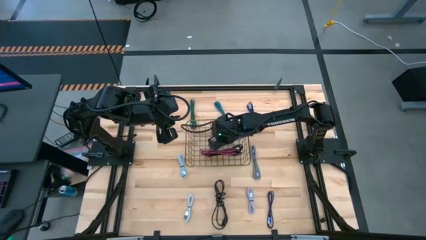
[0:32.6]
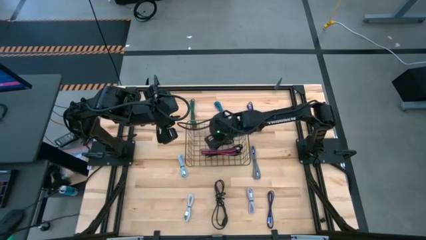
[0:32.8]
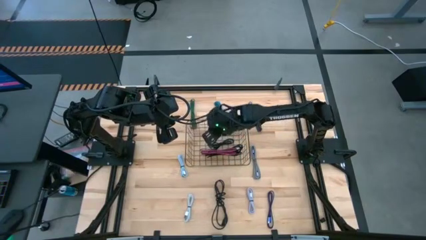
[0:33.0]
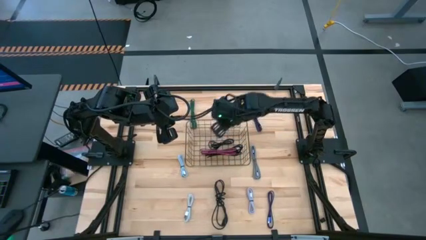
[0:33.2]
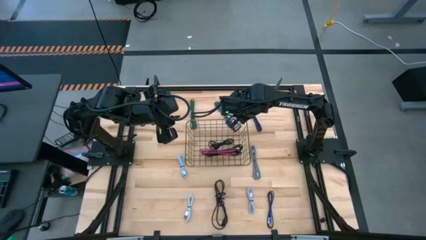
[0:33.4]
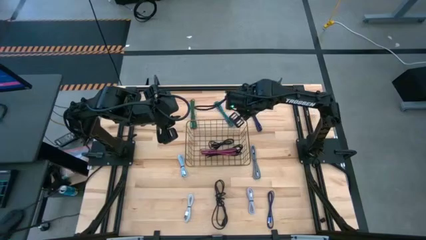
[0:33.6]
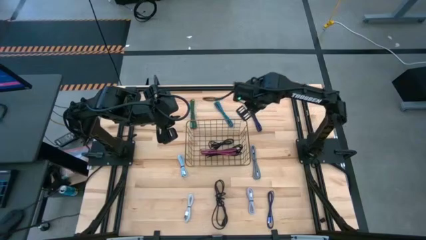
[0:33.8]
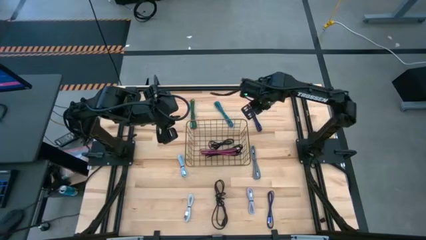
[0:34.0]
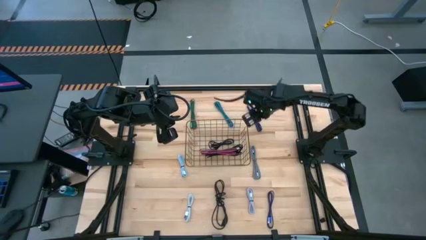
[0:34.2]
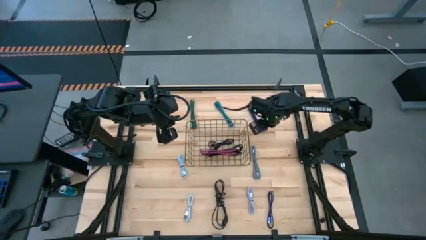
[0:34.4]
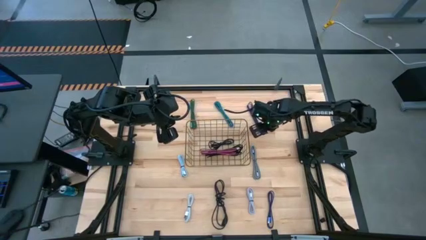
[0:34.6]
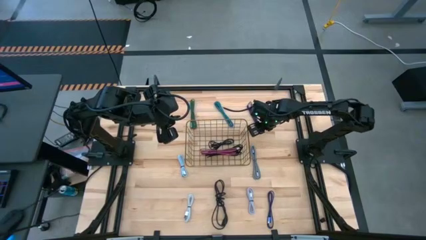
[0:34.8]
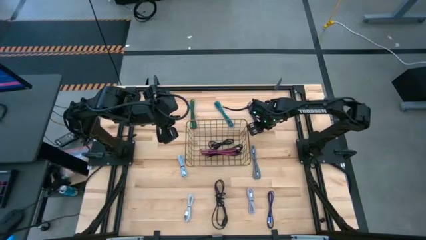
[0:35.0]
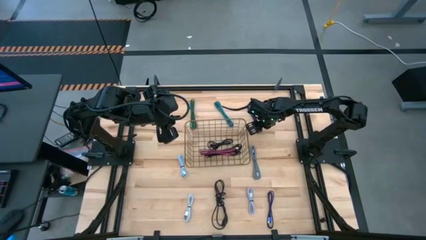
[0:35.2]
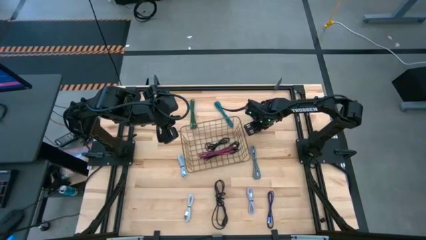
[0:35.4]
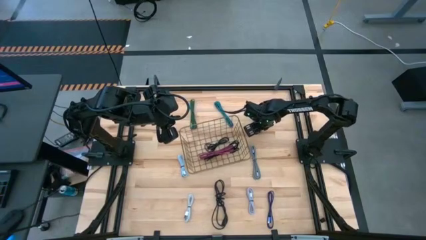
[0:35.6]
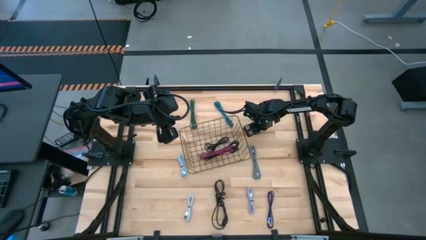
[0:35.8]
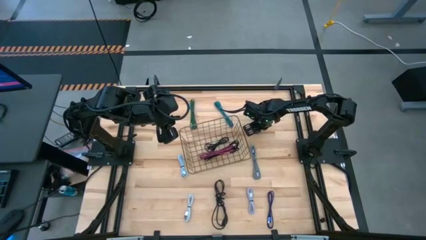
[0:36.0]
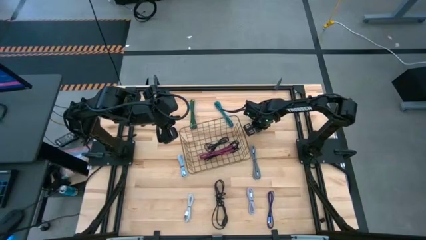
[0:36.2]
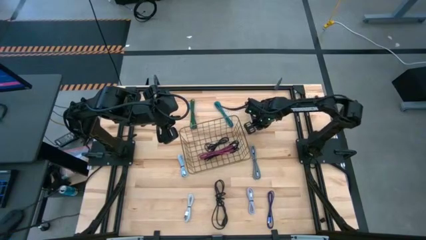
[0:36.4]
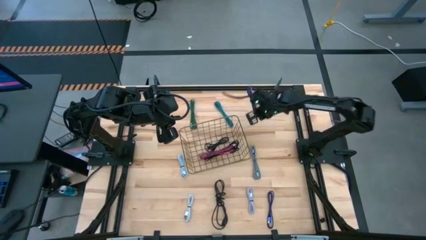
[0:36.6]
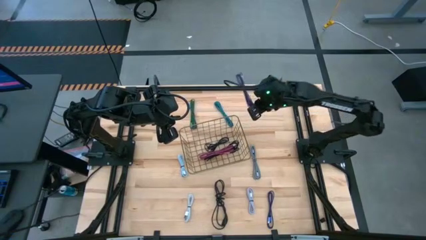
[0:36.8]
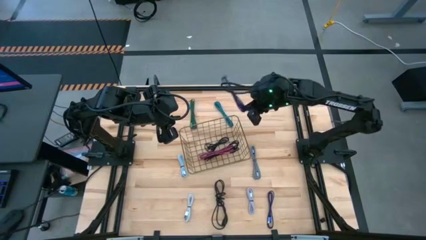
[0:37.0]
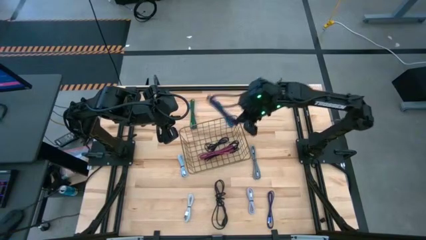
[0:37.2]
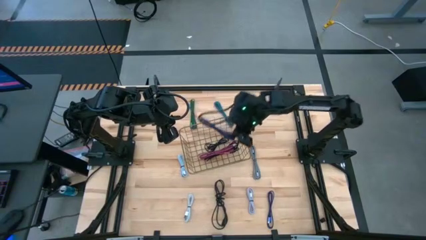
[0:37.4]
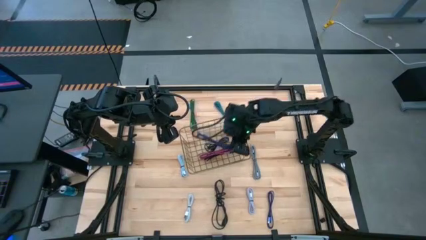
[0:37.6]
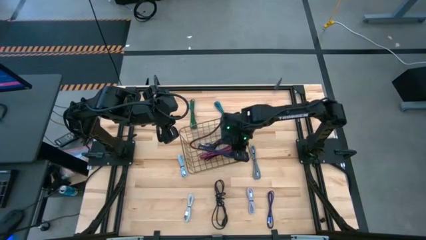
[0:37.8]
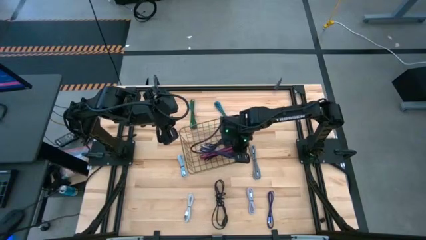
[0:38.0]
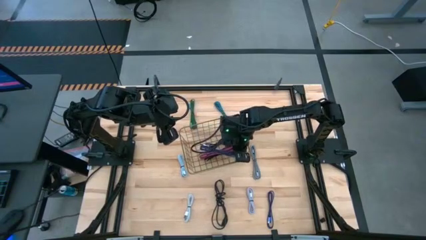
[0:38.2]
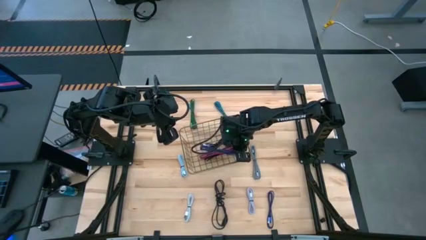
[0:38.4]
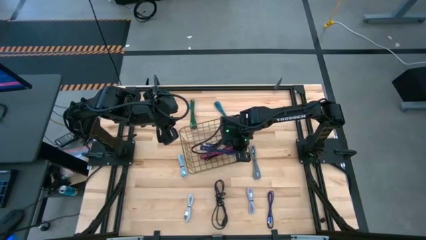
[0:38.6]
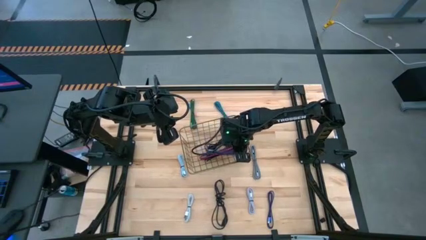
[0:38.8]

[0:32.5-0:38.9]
Task: Pick and place USB-C Cables
Put the top dark blue USB cable into the gold wire basket

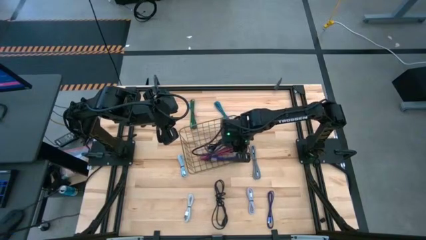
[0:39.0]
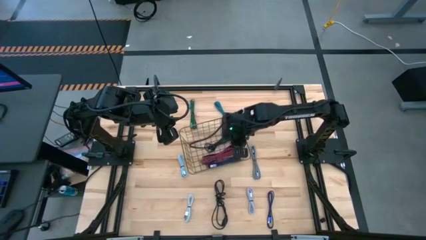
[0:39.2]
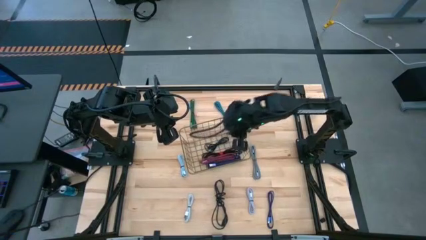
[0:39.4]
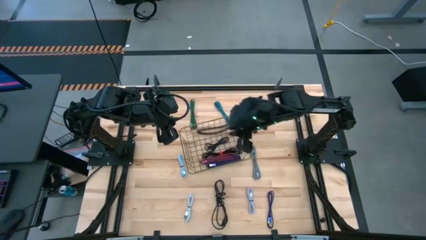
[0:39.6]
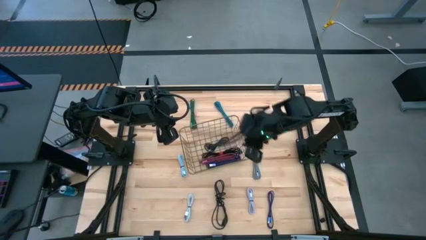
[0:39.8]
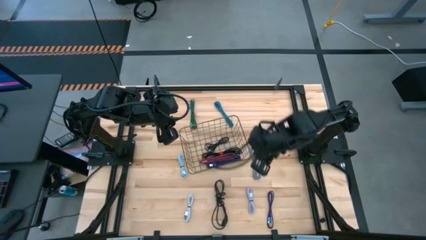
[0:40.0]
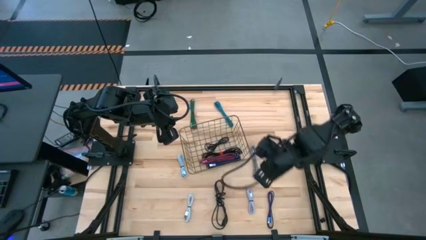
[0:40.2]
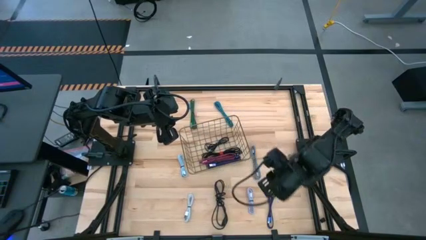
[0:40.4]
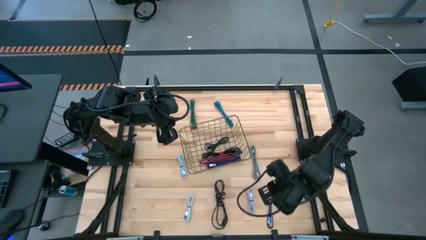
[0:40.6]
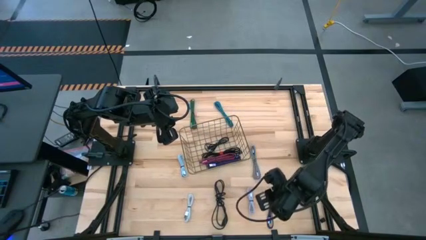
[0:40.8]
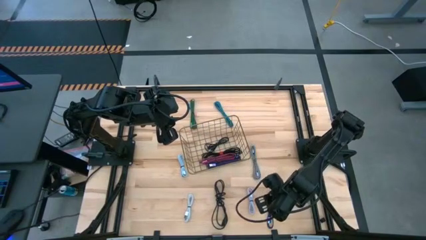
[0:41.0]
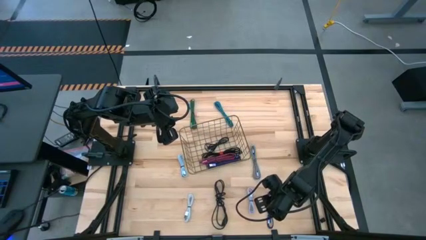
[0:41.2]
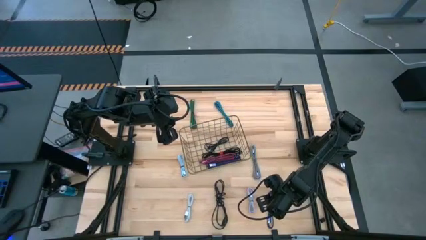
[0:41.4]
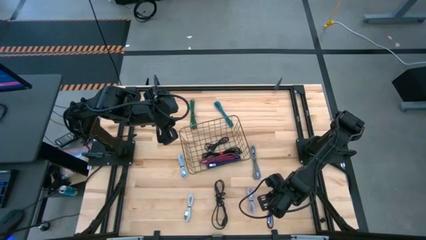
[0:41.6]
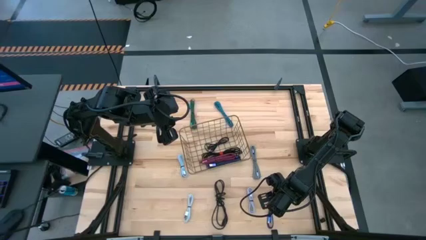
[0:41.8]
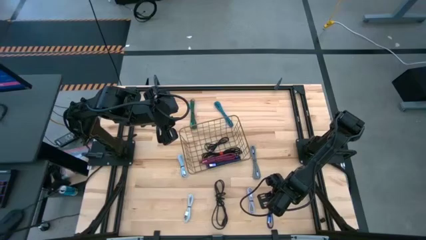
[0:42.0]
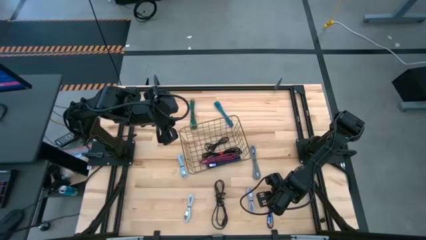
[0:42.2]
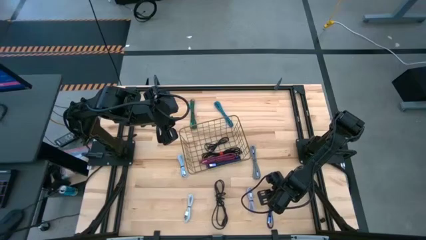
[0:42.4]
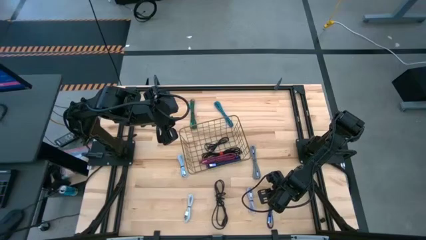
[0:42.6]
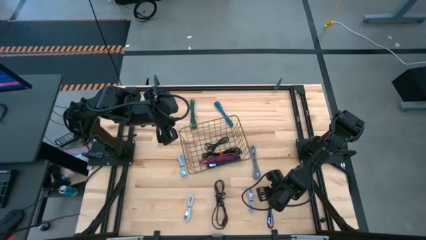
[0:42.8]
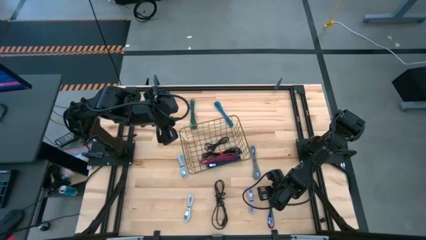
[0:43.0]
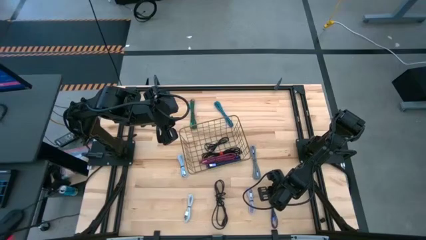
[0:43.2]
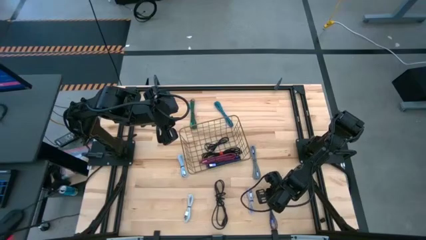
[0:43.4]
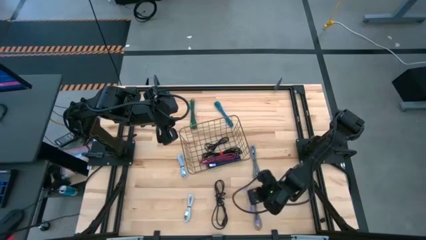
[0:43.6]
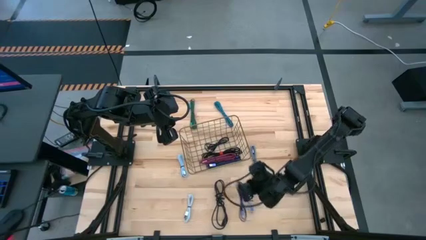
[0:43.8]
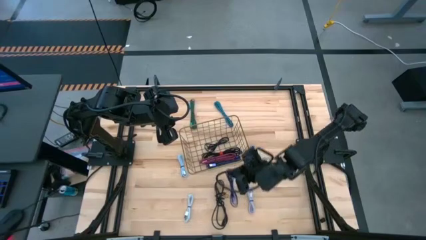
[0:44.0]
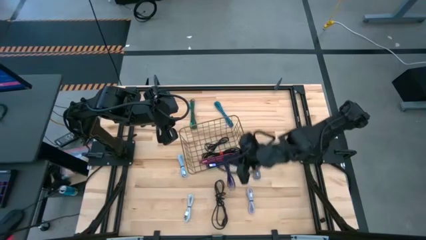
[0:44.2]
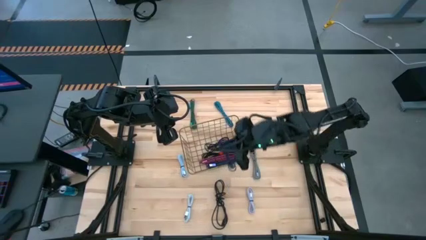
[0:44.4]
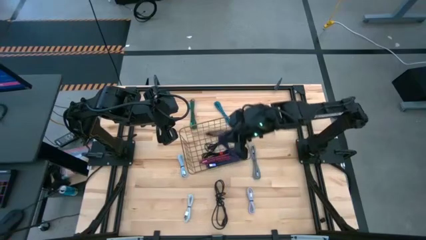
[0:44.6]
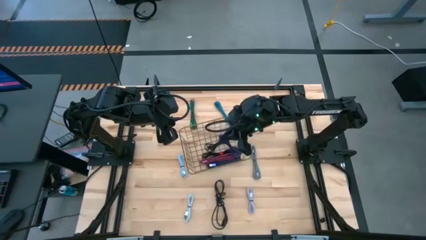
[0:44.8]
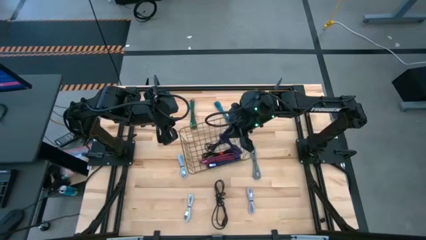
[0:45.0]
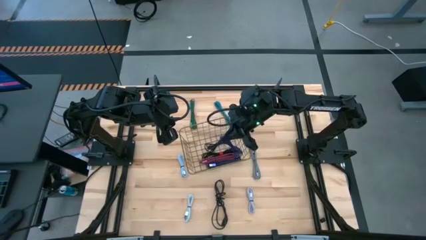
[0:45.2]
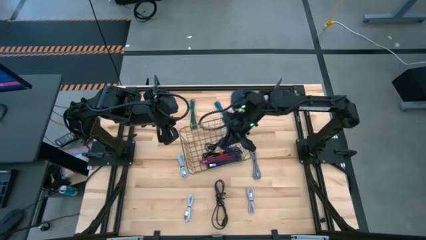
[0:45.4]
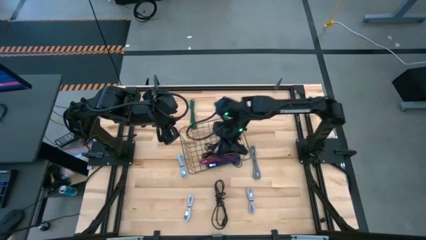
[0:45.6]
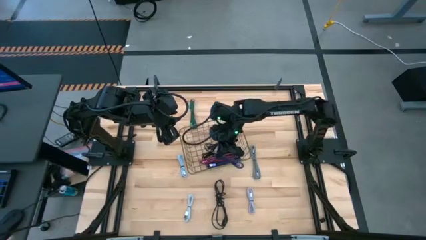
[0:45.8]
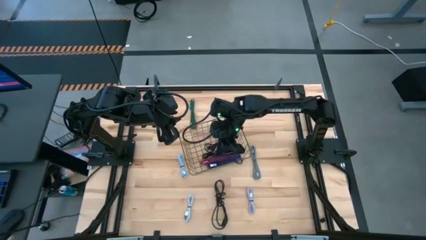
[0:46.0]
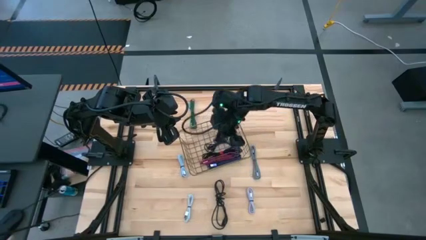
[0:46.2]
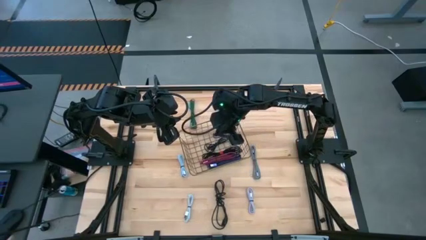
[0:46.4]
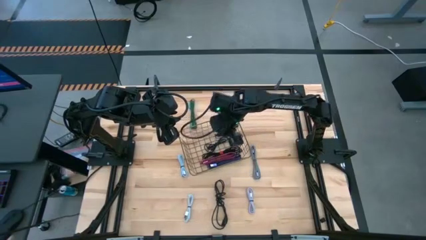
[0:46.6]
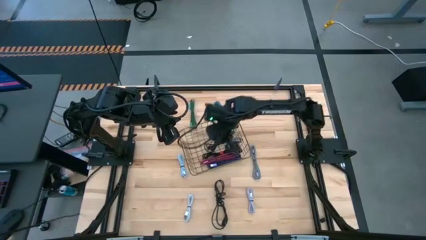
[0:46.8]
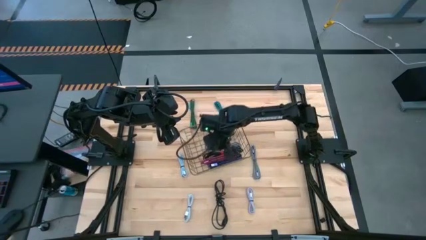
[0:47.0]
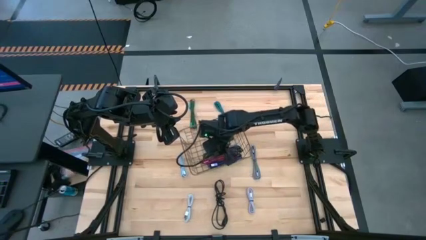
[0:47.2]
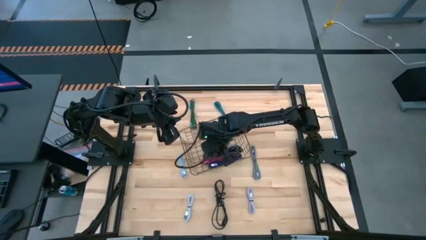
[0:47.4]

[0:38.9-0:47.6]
Put the dark blue USB cable into the gold wire basket

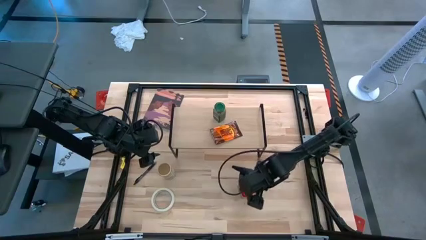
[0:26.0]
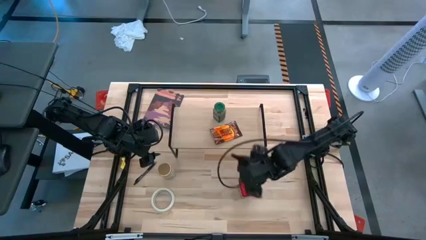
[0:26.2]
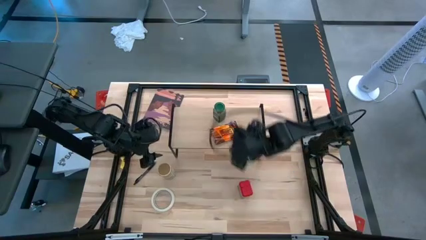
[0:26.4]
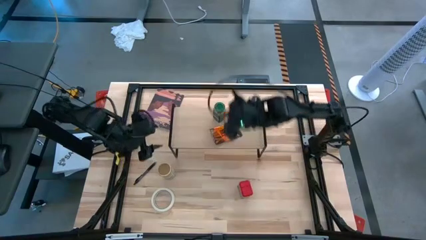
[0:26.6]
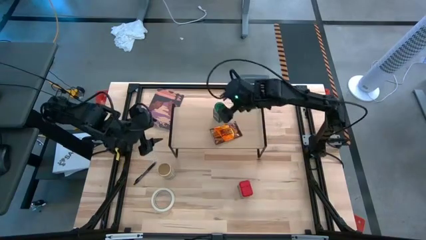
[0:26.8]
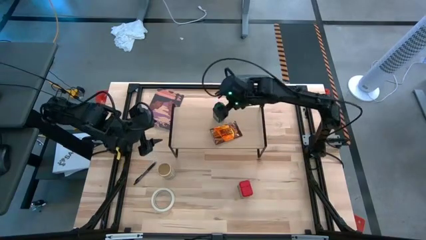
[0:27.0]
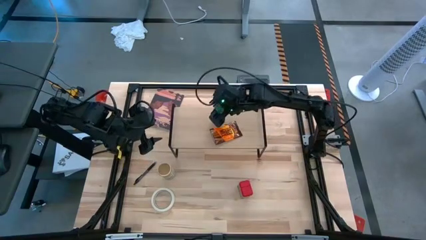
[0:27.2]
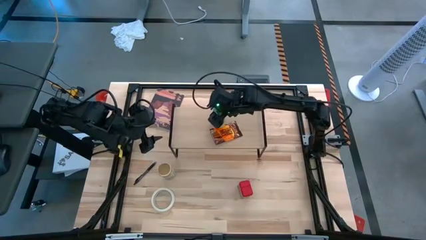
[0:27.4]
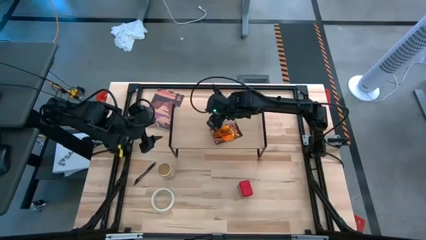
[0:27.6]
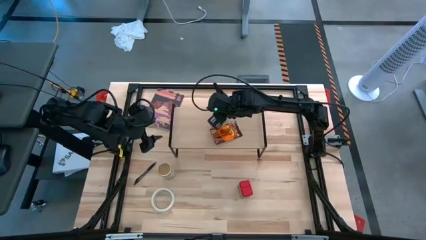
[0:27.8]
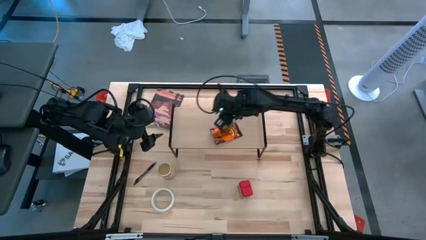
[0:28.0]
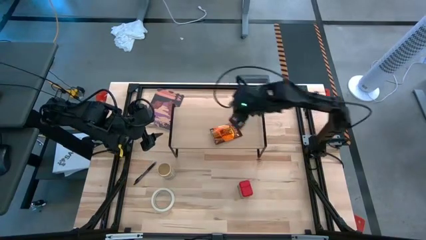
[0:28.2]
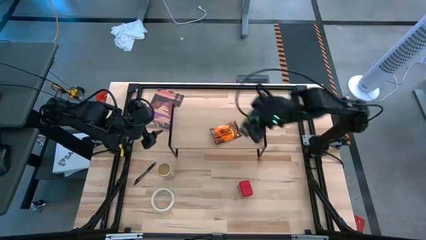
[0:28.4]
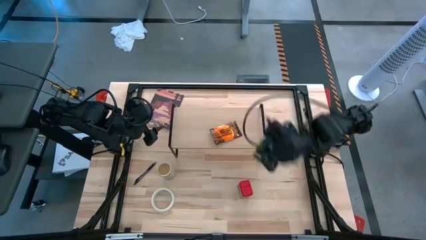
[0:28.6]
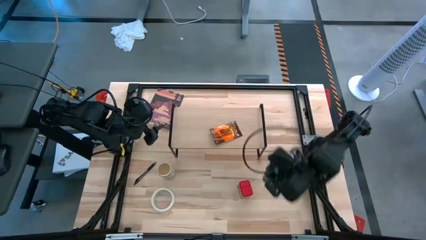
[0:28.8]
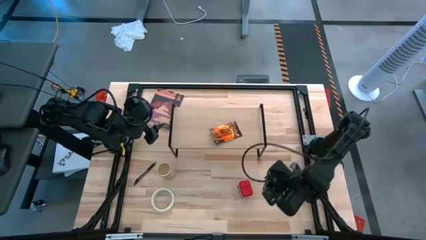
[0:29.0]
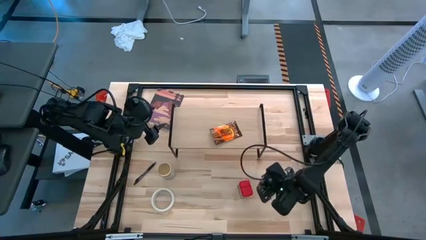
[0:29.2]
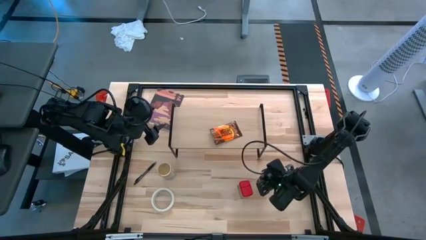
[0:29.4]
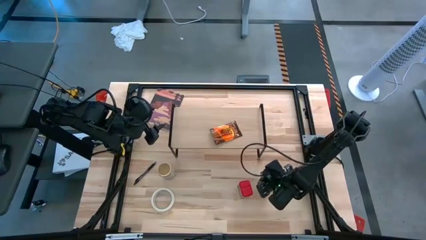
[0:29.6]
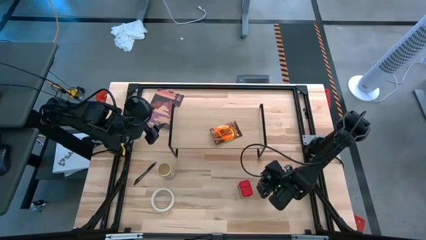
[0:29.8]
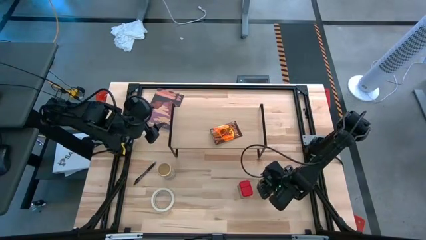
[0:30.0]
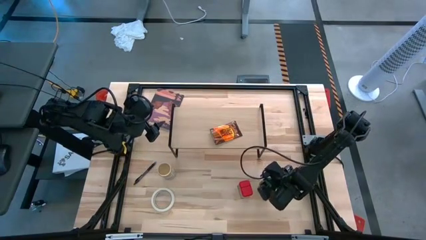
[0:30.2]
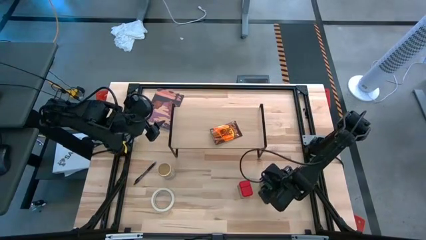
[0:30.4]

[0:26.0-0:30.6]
Task: Shelf spices
Remove the green seasoning bottle from the shelf
